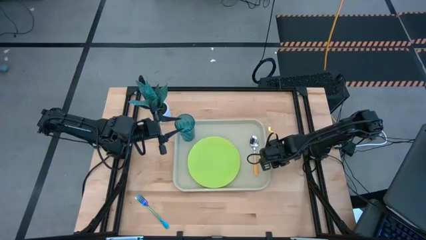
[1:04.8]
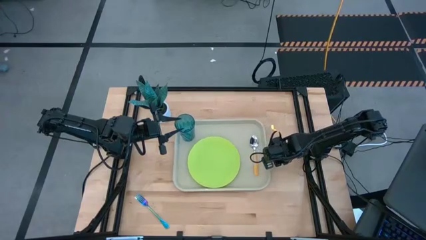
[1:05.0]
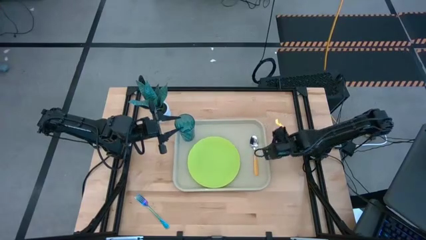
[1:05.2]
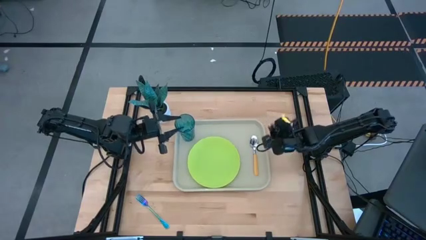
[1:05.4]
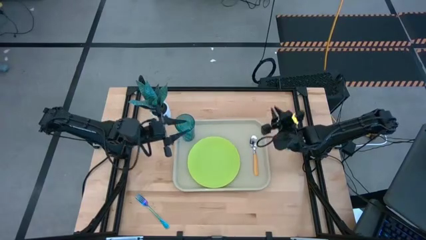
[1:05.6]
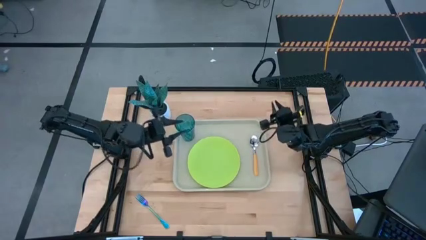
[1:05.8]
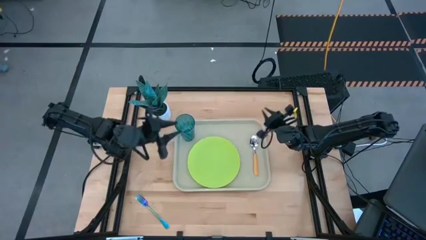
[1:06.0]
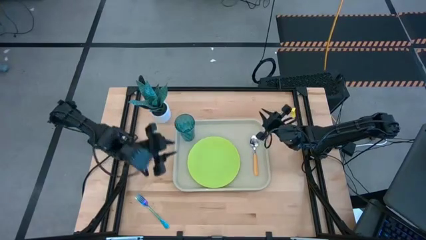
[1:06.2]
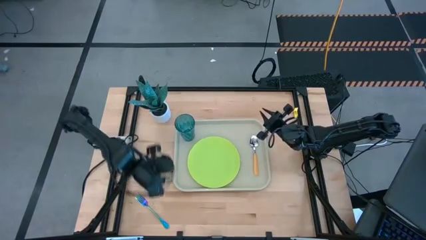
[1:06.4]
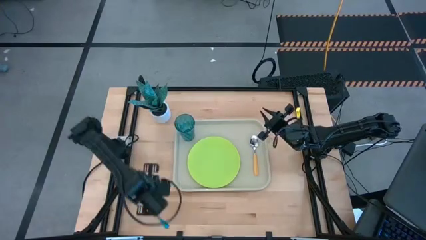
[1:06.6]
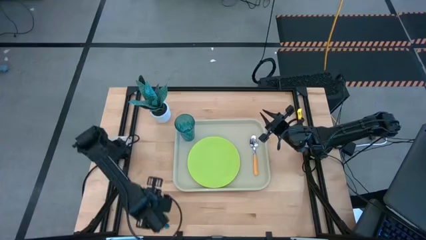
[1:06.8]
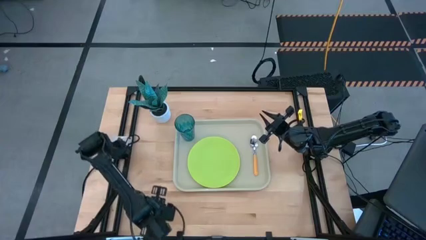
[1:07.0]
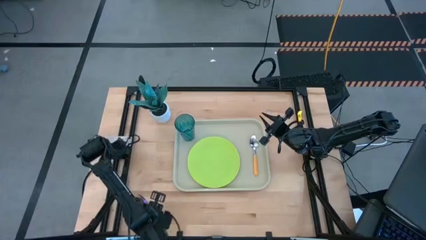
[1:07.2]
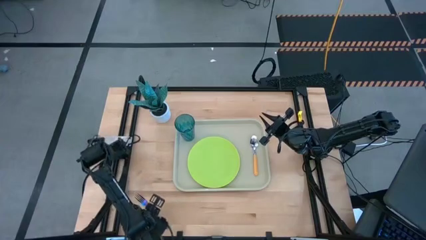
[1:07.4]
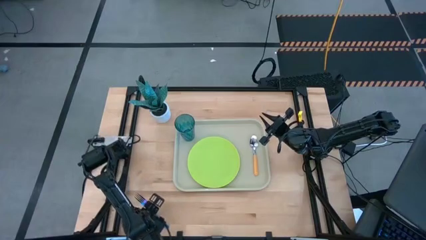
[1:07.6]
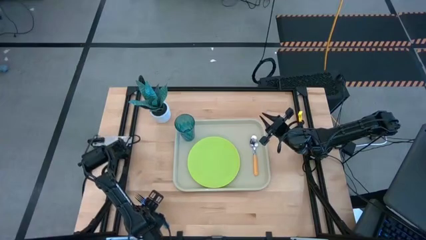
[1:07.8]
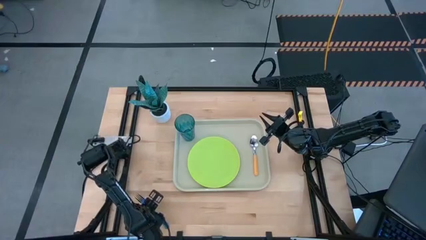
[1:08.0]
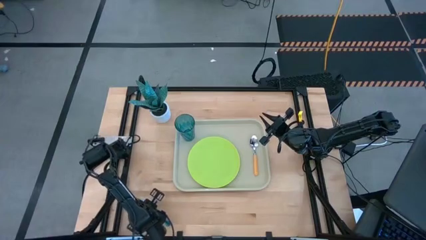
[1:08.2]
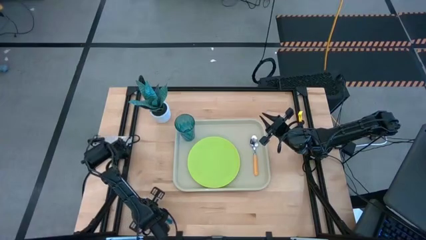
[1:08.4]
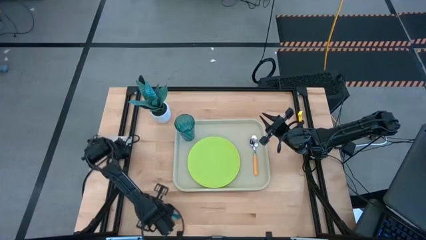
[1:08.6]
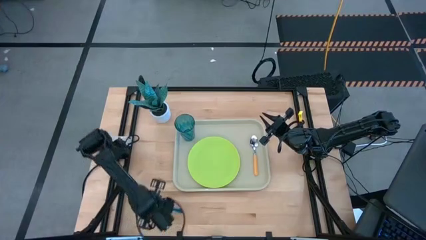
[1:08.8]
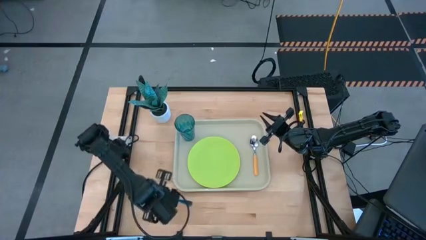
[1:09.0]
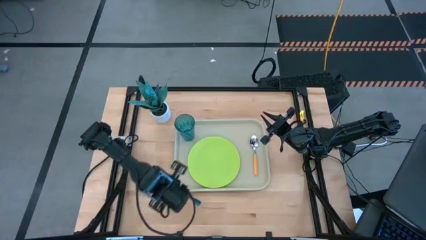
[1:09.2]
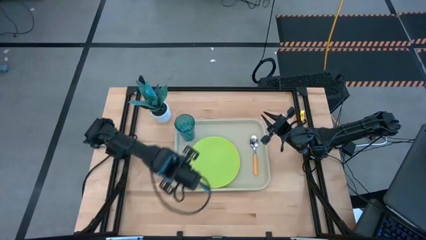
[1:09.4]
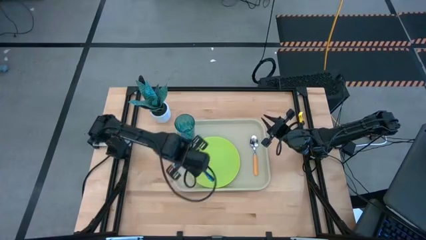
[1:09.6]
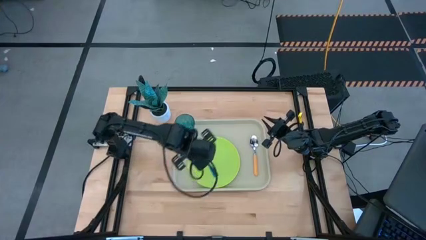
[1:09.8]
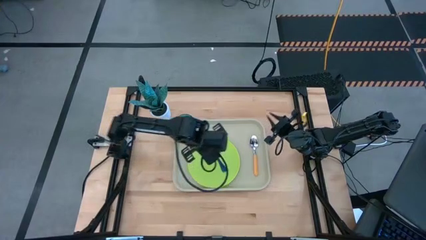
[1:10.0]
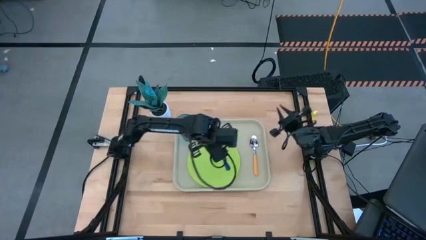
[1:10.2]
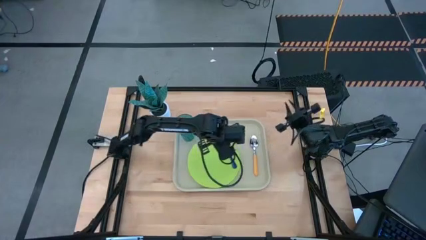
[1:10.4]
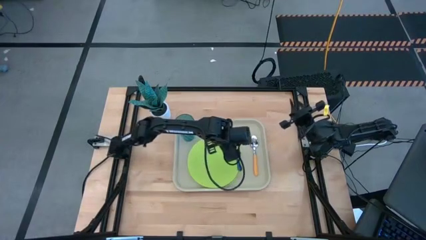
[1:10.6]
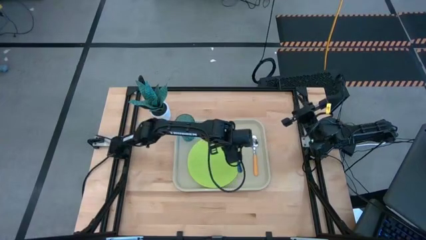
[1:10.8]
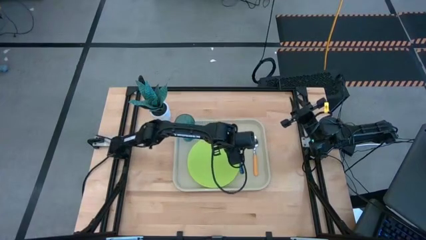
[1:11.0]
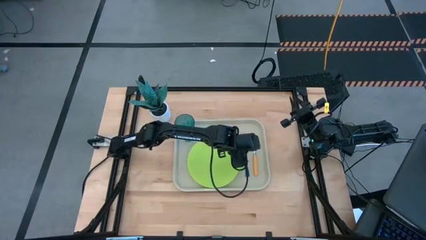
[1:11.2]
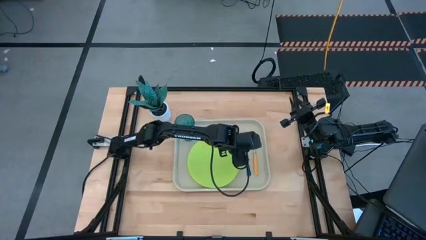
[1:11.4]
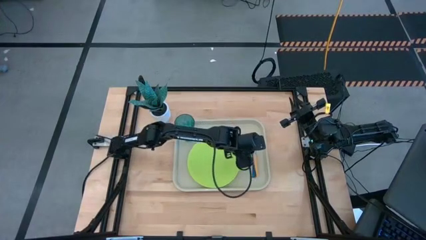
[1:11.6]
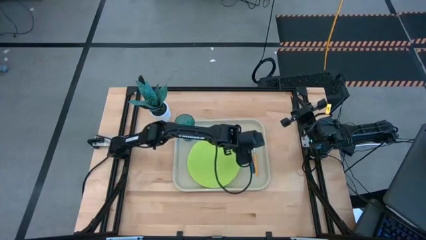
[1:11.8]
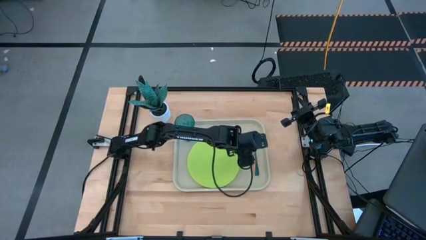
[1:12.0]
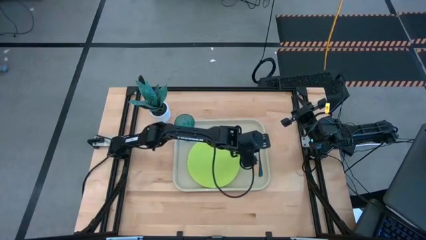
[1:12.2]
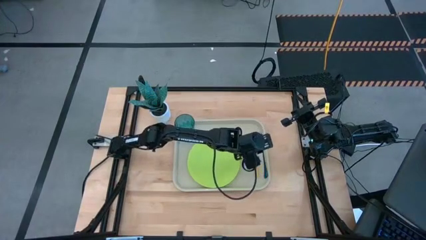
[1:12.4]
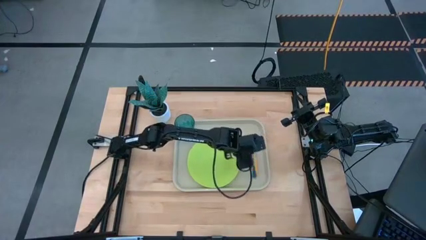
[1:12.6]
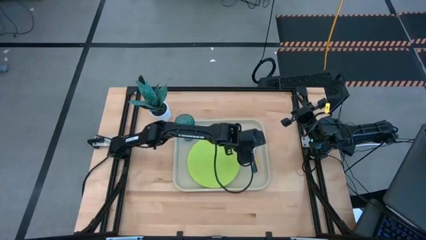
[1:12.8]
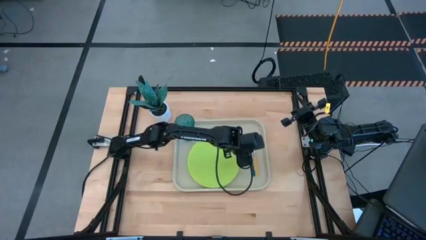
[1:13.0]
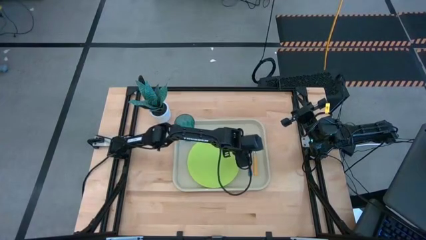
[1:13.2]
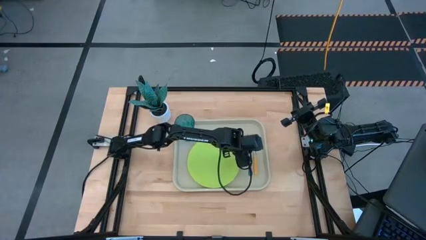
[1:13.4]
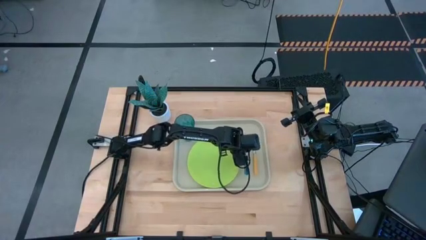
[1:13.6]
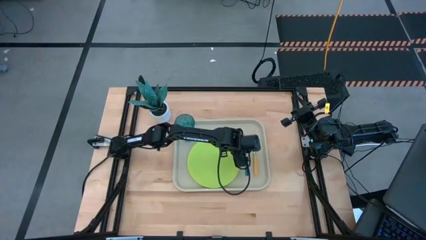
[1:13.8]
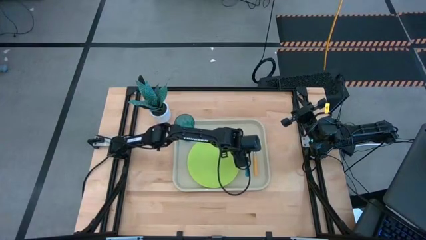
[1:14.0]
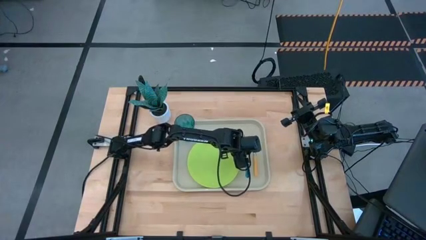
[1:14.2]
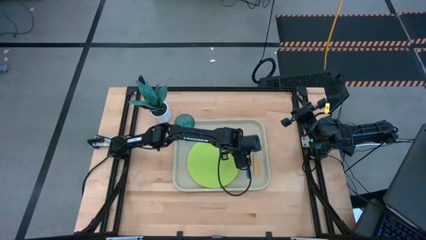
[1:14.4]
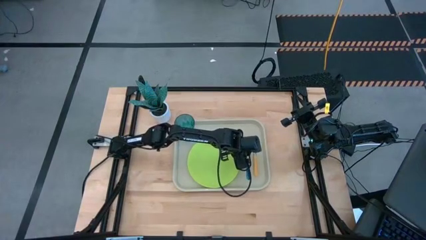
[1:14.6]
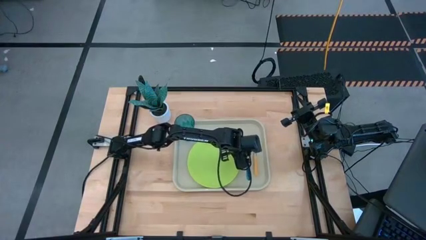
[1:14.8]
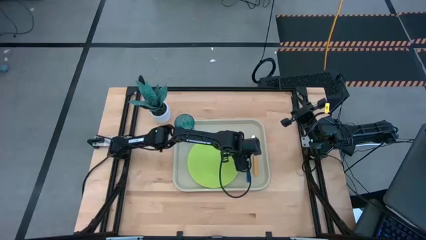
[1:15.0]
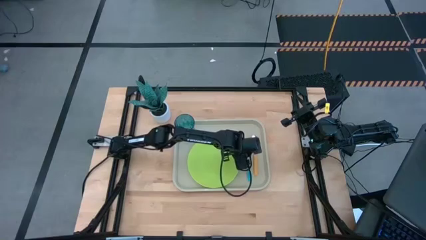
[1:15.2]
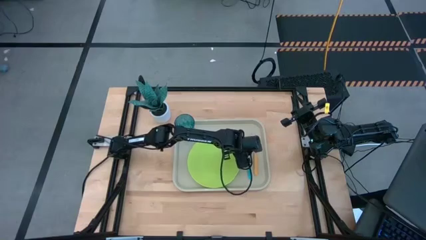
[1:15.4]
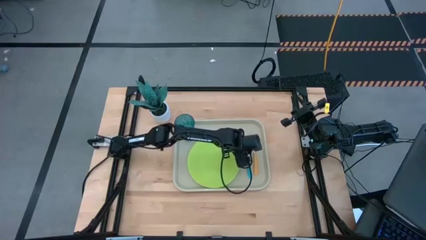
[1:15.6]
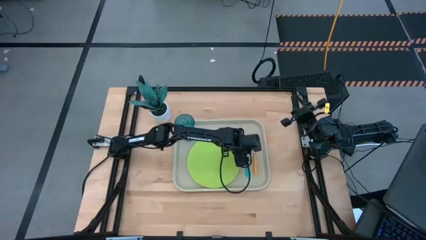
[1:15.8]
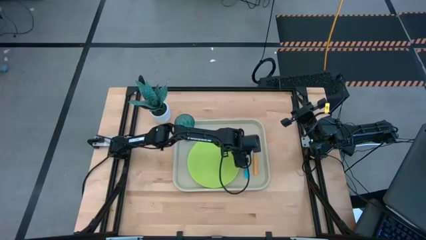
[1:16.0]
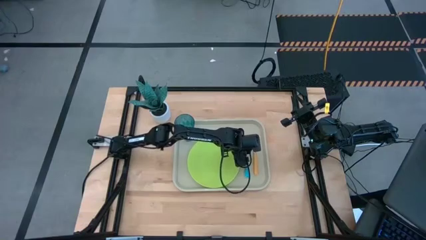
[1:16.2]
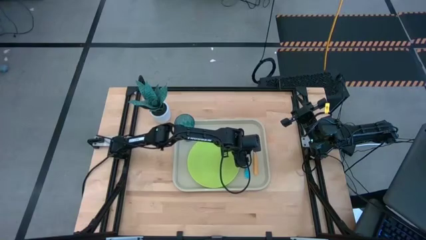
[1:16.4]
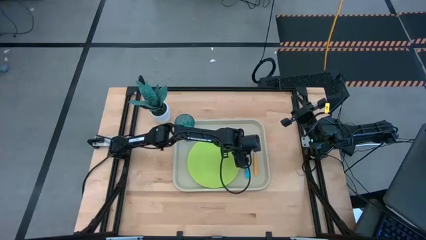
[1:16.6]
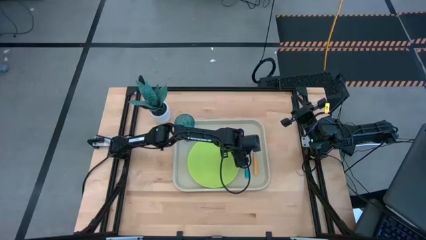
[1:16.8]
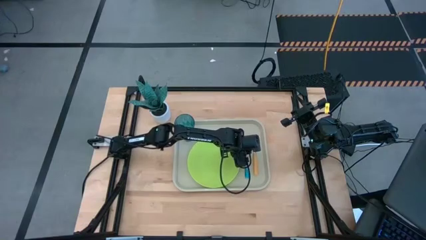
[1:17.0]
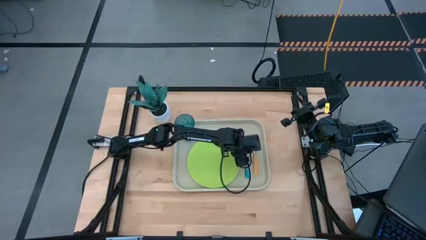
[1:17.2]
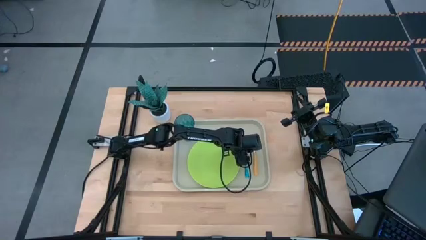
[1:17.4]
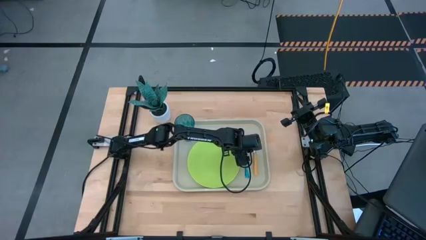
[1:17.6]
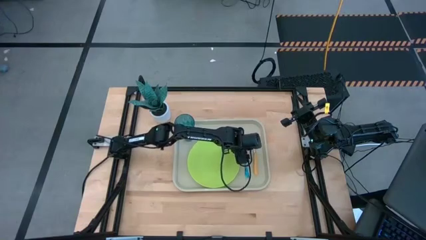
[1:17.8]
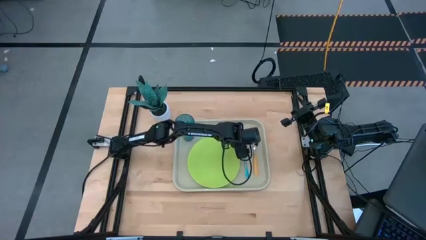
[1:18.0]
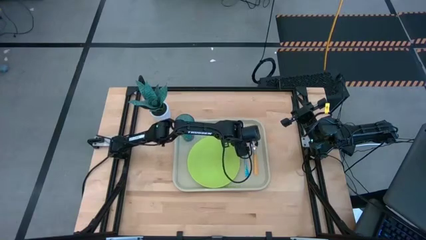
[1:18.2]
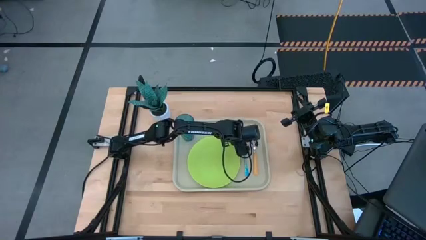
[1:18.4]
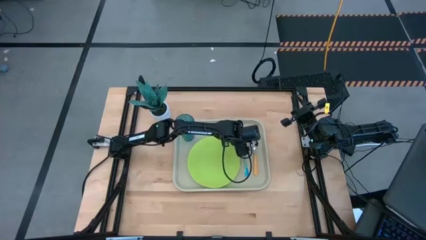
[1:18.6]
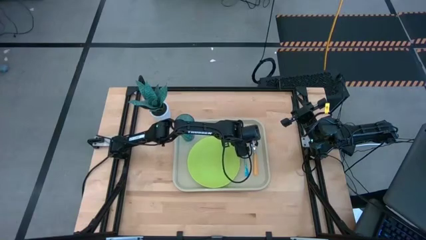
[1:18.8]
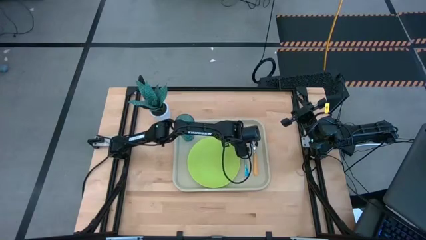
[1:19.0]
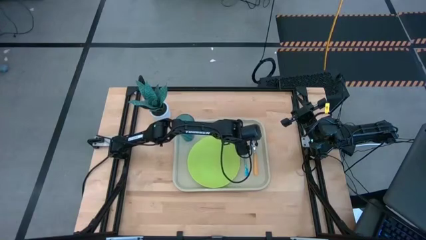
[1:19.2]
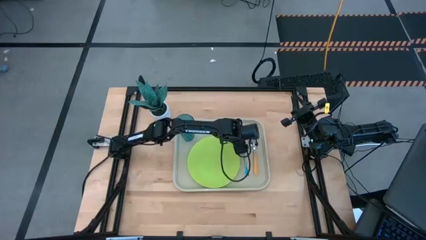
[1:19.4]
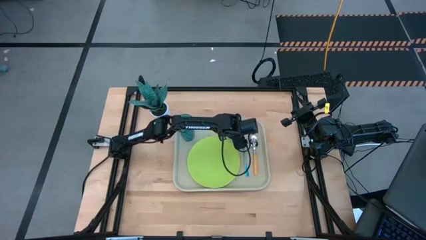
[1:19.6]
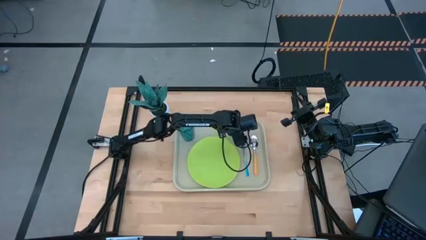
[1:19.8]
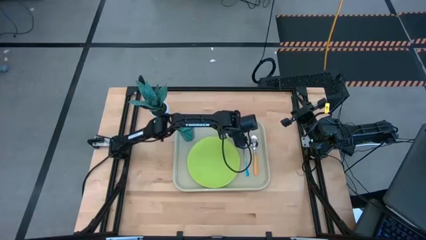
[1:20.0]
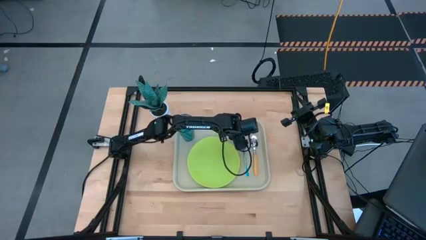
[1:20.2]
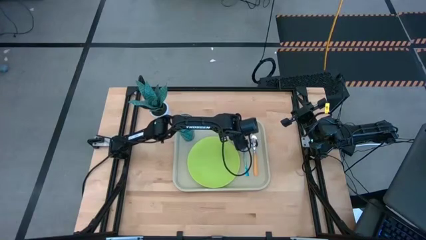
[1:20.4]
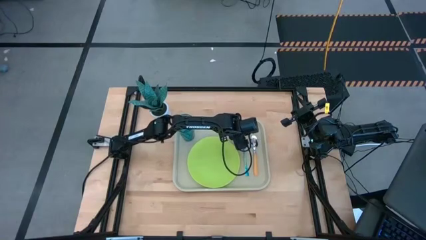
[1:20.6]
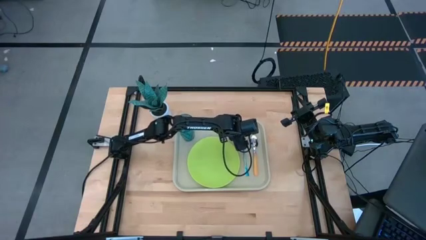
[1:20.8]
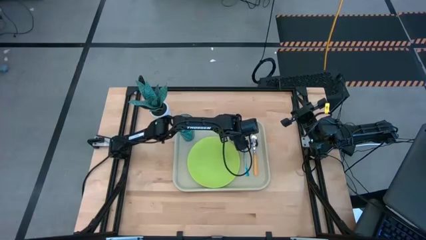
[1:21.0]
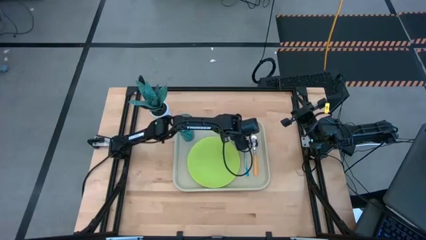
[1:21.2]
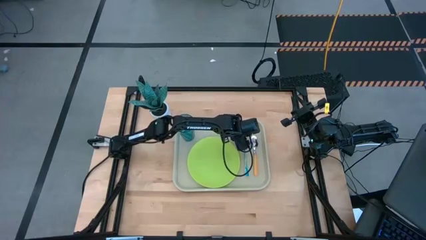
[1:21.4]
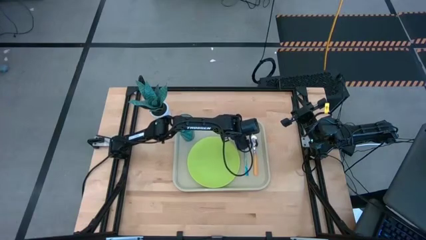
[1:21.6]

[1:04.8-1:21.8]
Task: Pick and place plate/cup/fork/spoon on tray
Put the fork to the right side of the green plate on the white food tray
